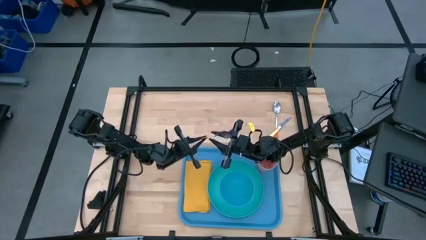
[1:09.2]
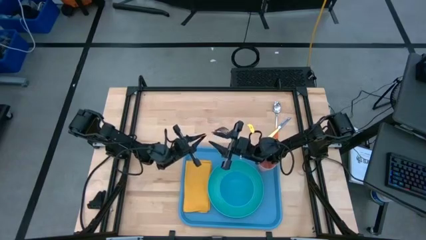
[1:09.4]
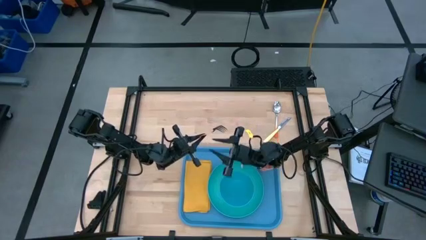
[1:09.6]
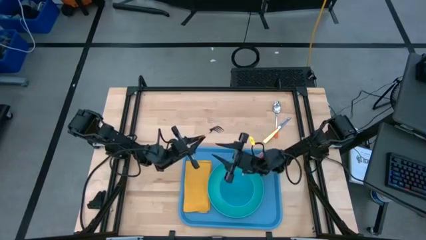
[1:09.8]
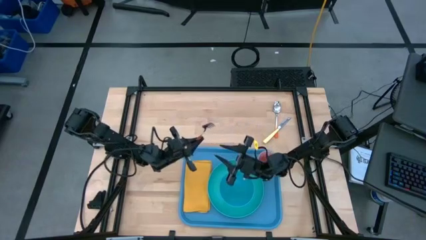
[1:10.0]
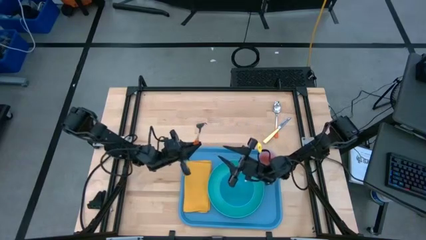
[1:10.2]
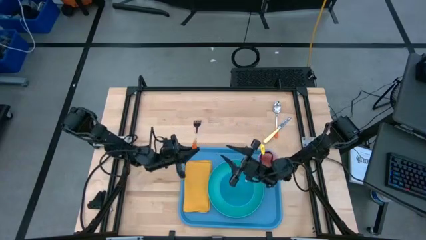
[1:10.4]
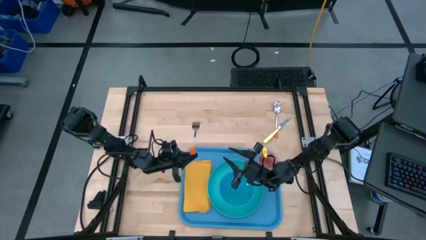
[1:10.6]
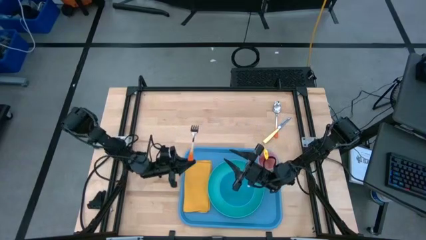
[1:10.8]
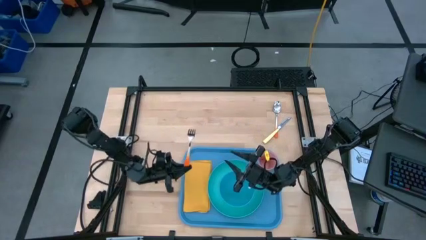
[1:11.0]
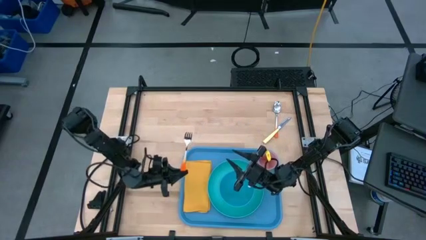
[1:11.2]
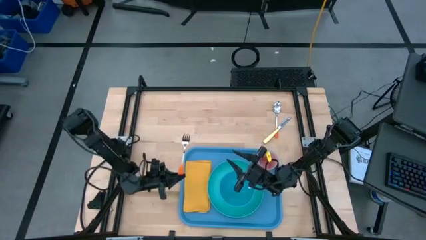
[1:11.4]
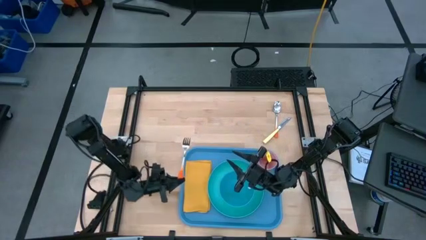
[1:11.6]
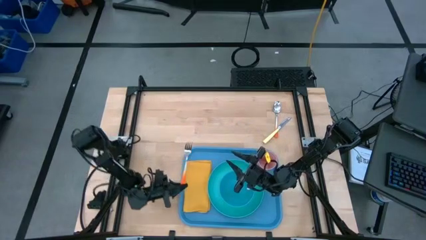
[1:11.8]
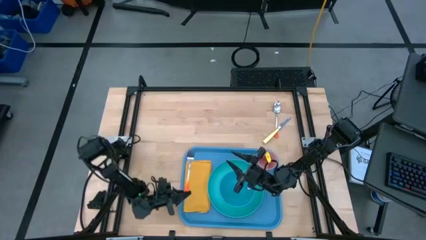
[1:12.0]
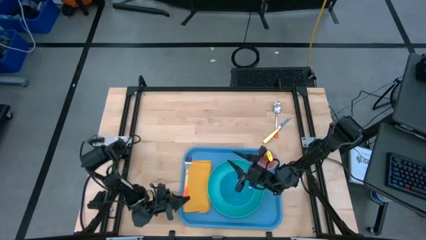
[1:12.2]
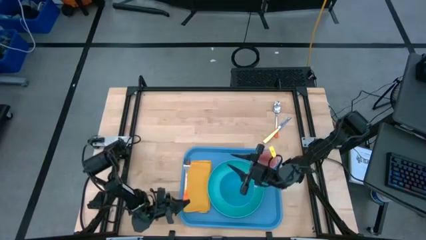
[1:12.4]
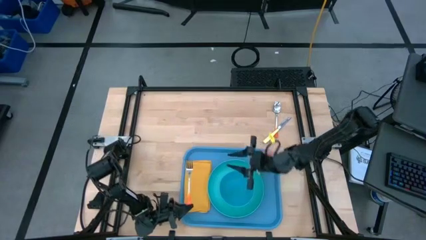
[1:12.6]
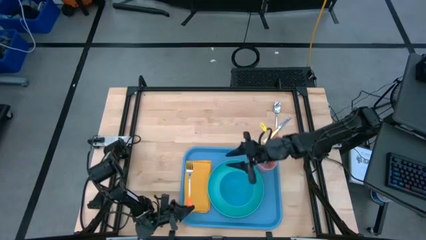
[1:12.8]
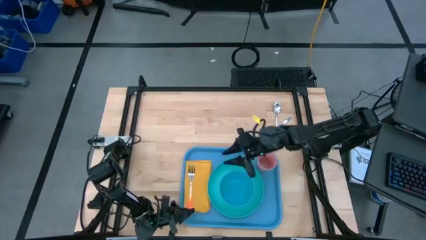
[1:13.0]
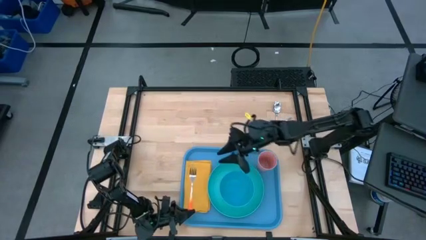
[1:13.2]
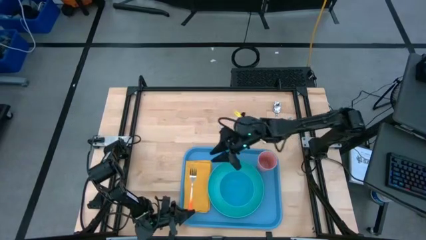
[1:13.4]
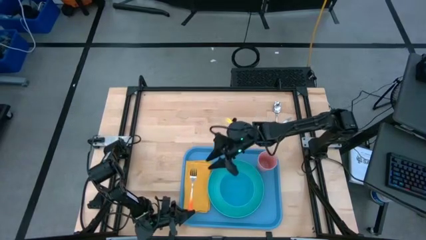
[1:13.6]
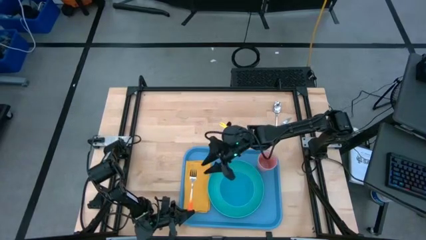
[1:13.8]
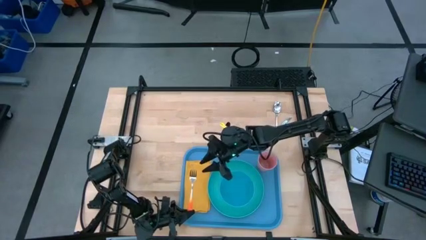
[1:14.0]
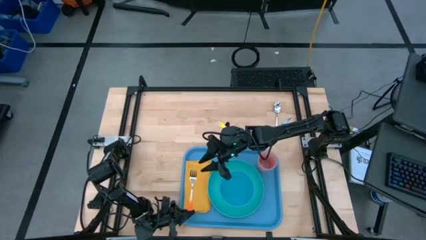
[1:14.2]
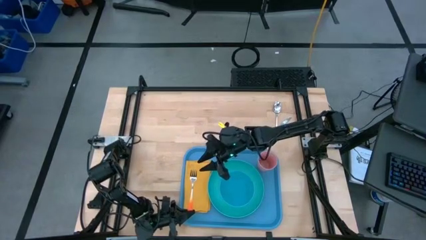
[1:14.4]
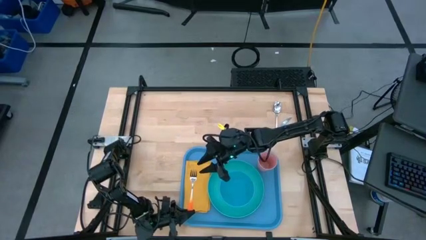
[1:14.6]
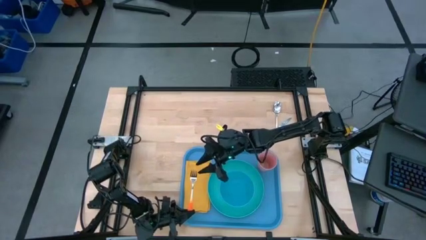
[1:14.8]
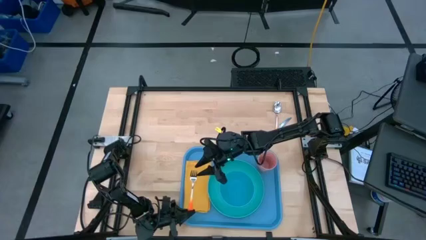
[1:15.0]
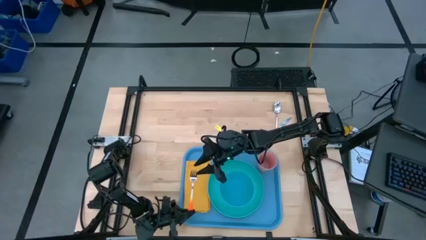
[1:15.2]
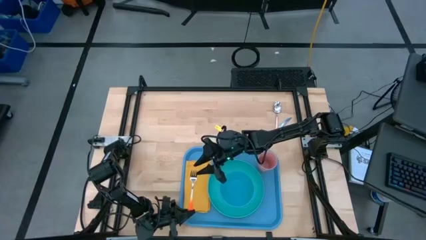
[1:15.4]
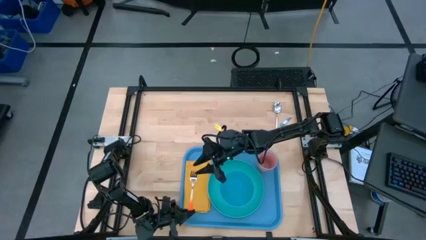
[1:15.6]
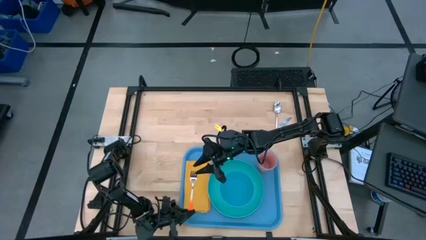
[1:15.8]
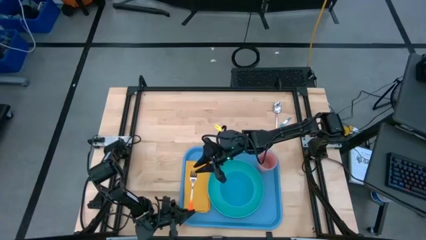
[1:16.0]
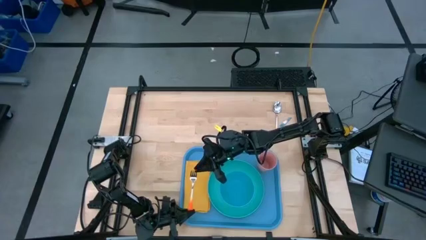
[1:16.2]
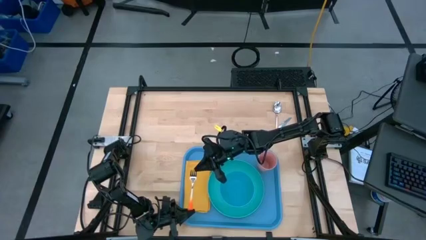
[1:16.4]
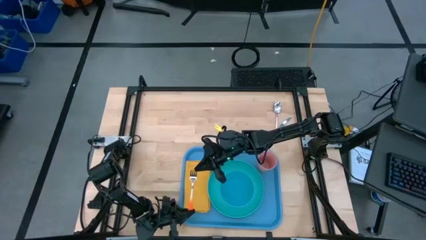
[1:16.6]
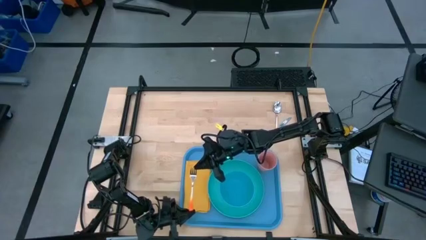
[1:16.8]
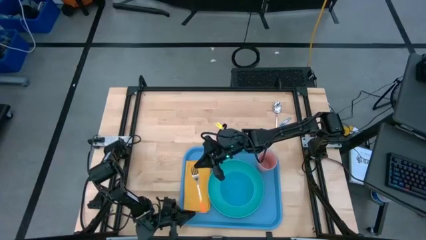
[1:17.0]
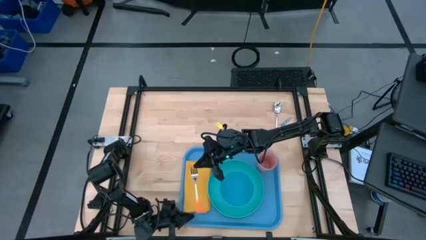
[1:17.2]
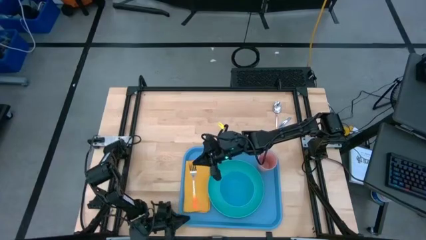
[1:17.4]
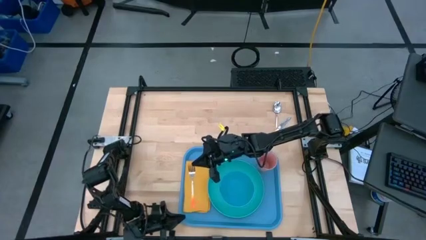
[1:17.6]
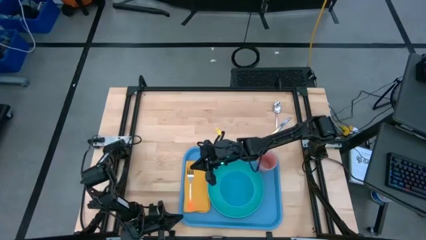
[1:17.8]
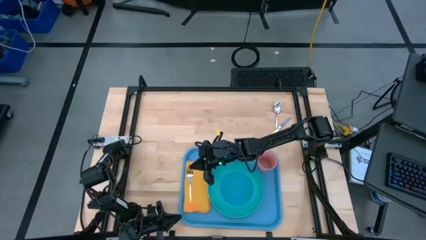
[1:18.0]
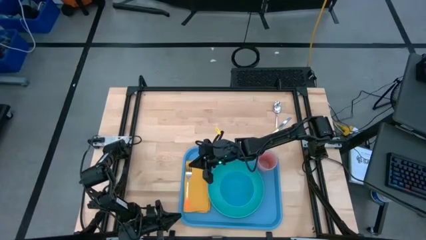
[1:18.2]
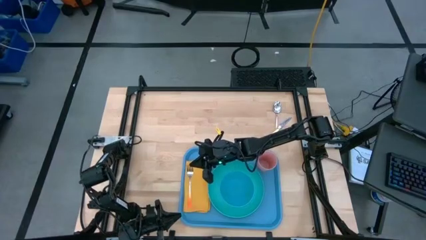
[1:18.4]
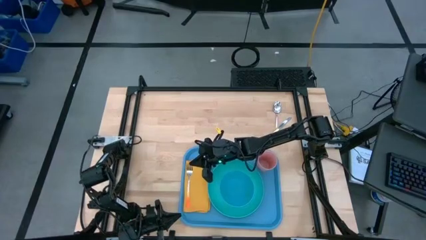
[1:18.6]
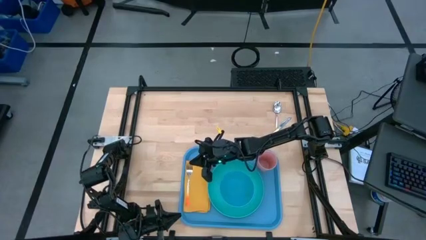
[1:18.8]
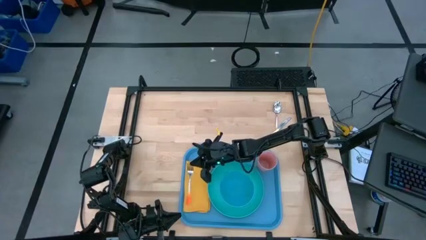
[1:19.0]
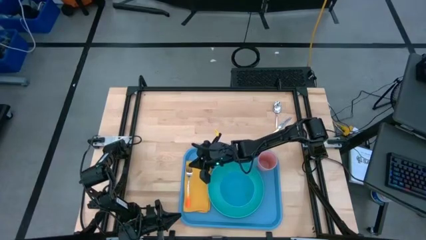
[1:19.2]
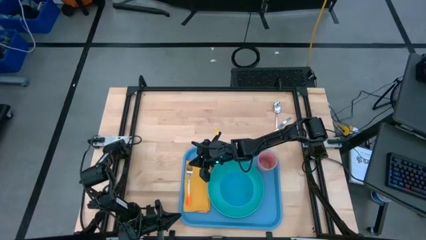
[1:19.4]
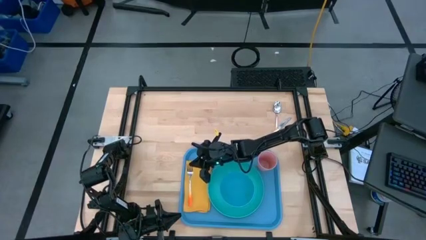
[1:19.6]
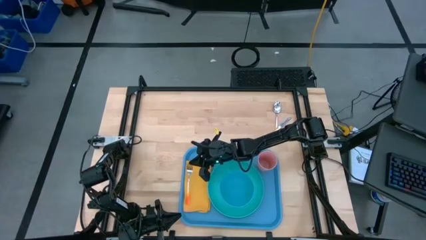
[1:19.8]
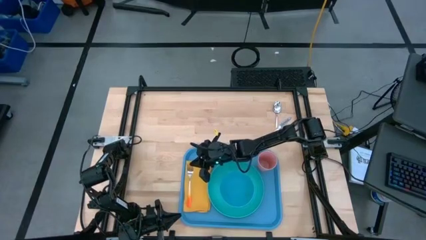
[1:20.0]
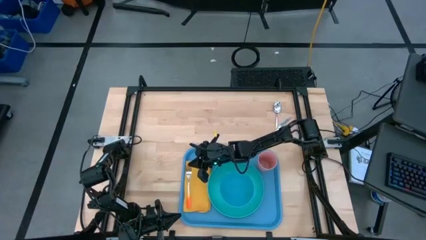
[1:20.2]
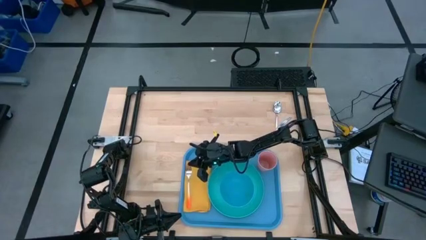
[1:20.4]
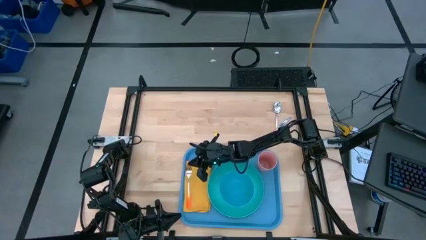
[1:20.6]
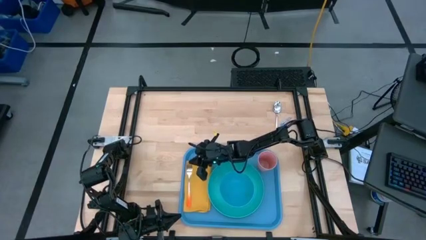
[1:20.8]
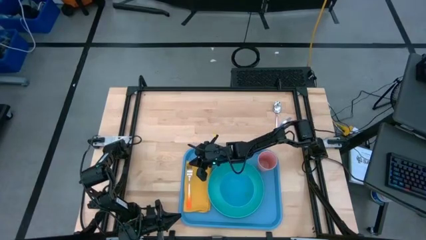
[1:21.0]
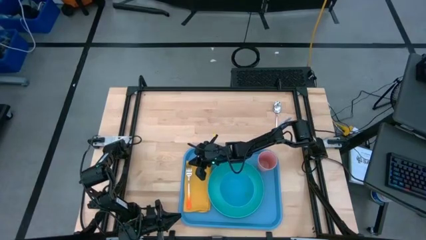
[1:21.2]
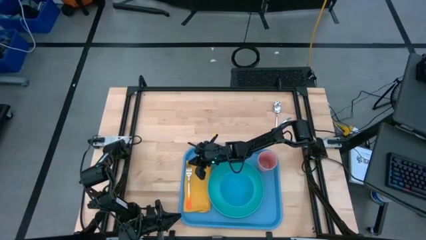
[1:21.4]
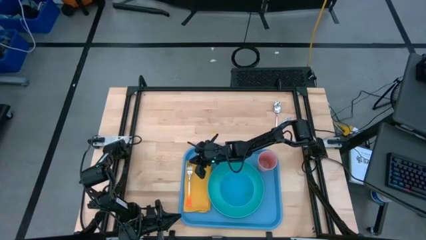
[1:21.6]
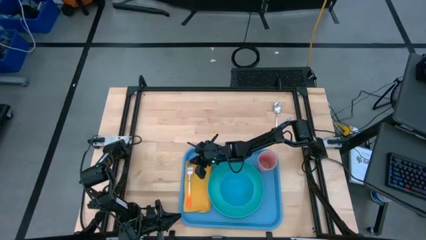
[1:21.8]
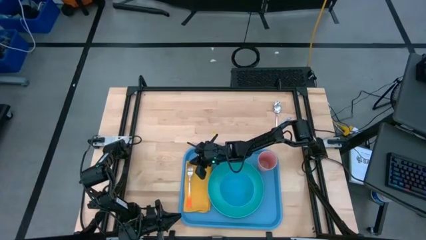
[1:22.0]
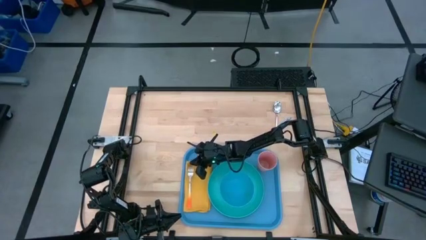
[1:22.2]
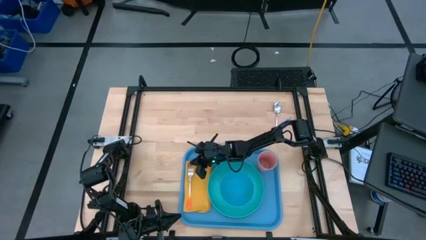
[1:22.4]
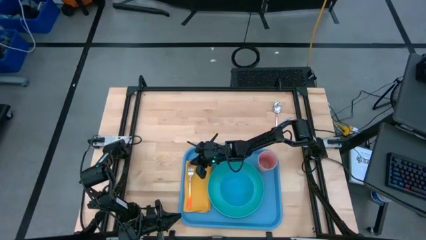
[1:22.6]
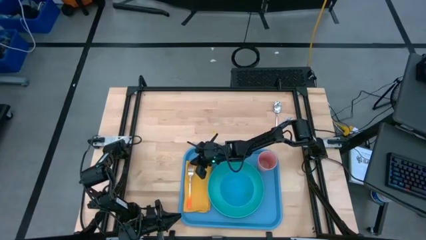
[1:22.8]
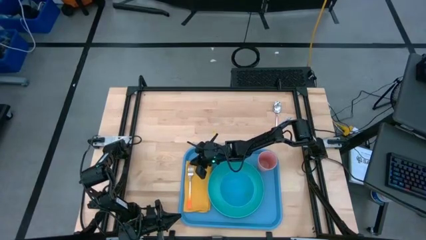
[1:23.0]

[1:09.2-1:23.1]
Task: Set up tray
Put the orange fork on top of the napkin

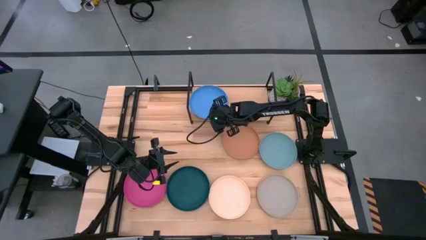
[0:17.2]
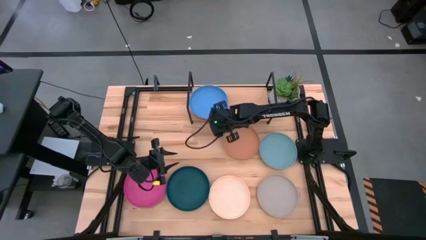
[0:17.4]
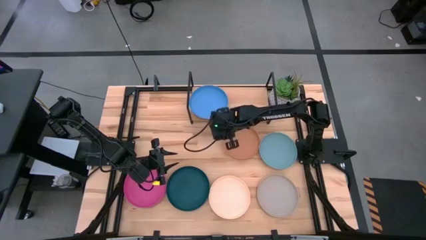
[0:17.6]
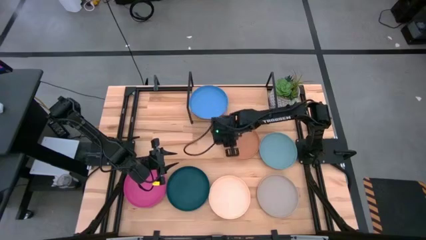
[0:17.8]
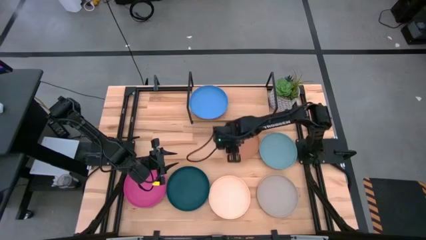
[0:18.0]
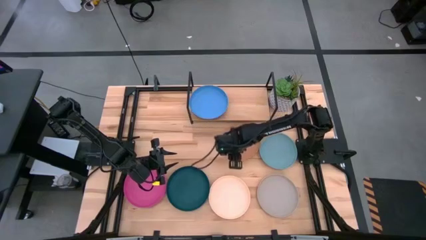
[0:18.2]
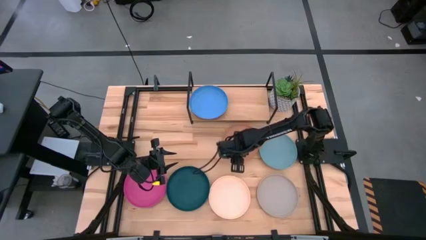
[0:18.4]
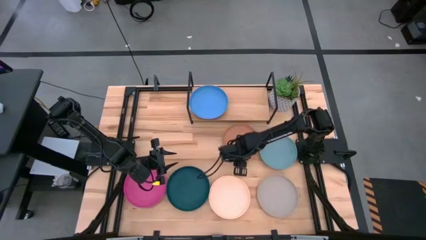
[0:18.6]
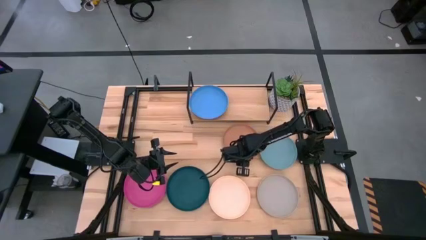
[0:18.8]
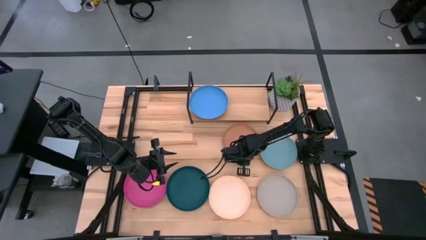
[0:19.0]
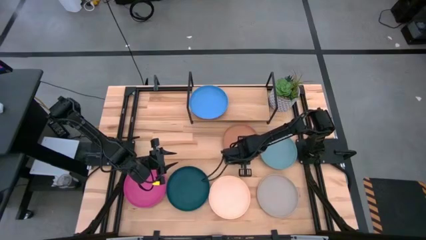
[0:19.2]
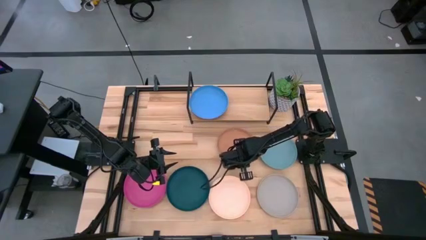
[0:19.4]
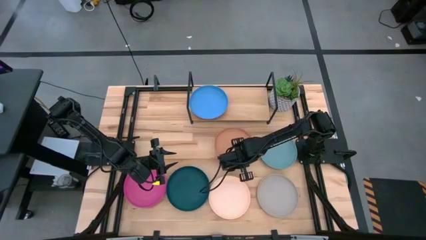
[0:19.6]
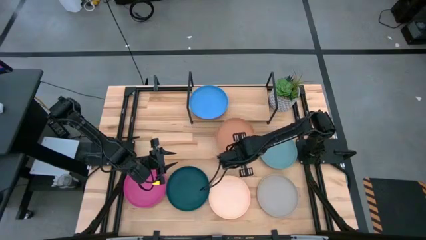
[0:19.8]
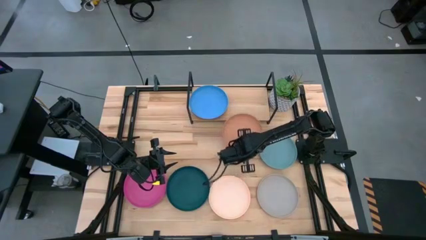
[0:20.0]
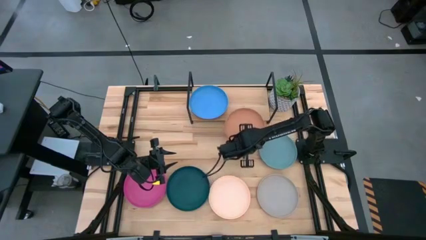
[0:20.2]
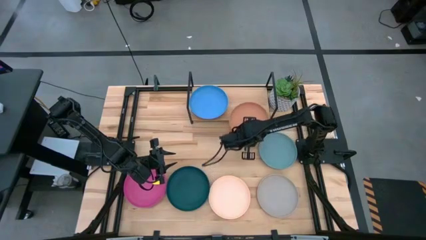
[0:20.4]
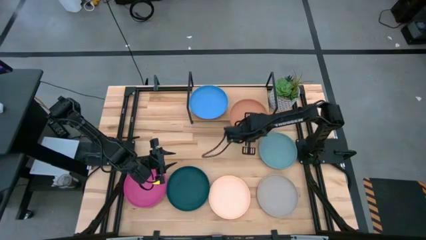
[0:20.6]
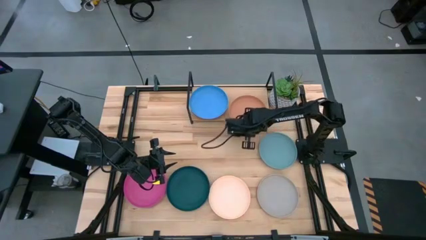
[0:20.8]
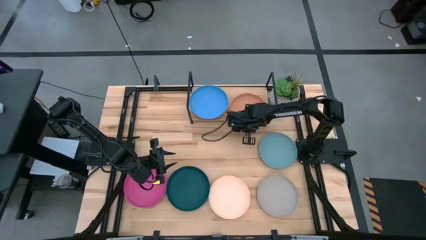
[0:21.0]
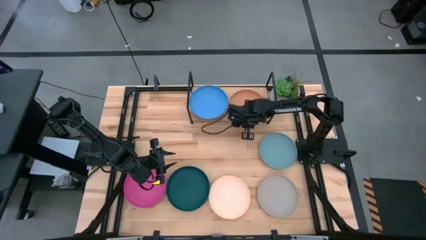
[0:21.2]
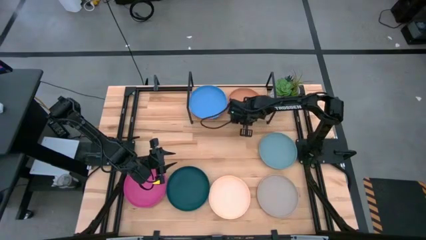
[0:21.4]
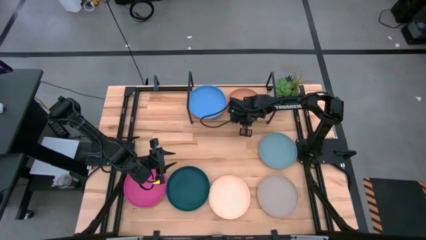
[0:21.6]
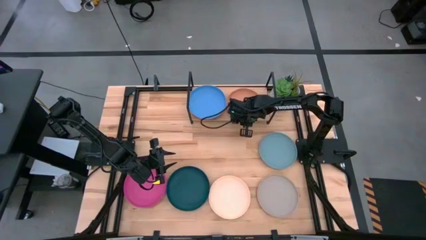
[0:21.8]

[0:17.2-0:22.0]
Task: Place and stack plates onto a shelf
Put the brown plate on the shelf
